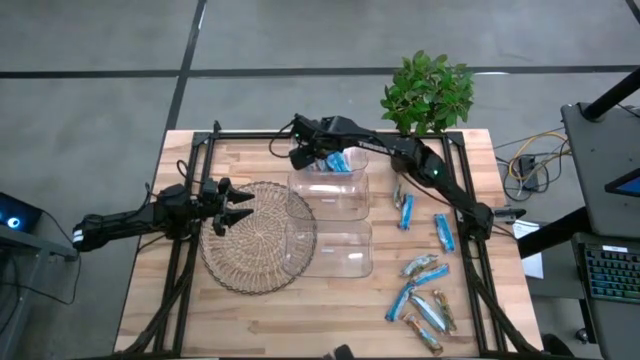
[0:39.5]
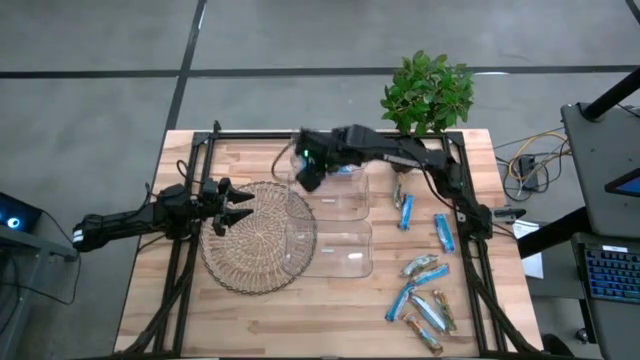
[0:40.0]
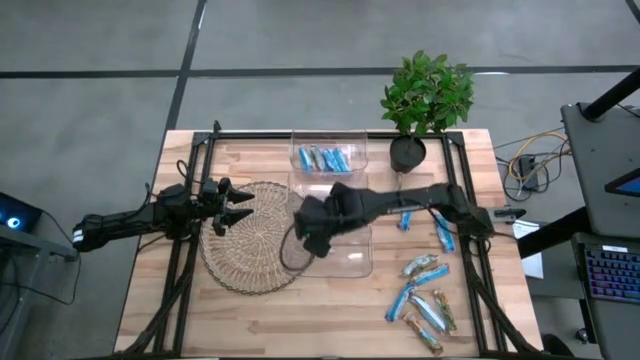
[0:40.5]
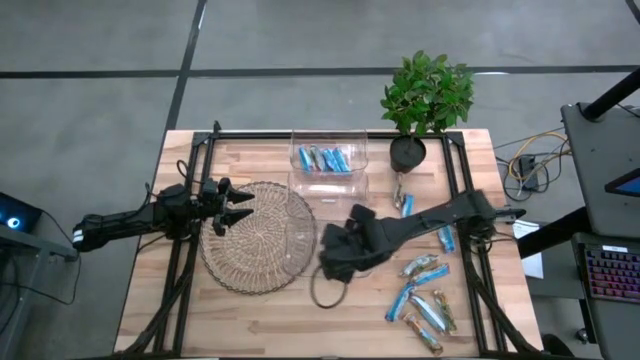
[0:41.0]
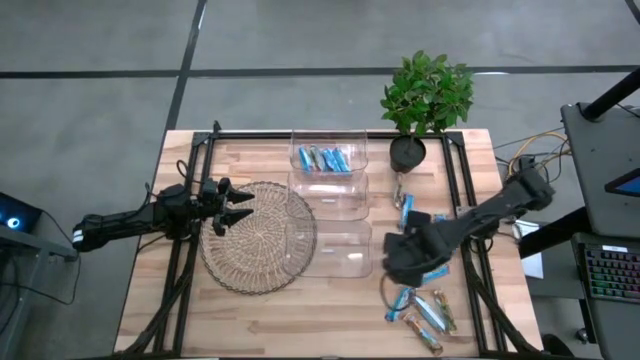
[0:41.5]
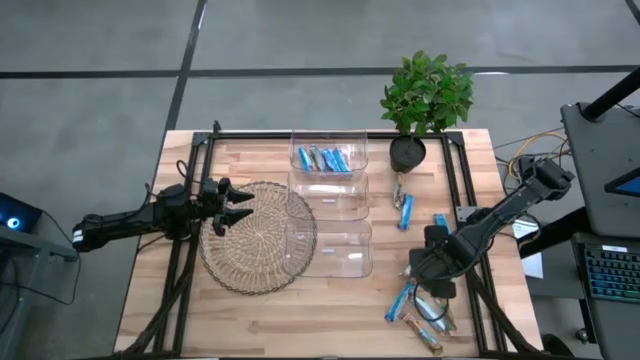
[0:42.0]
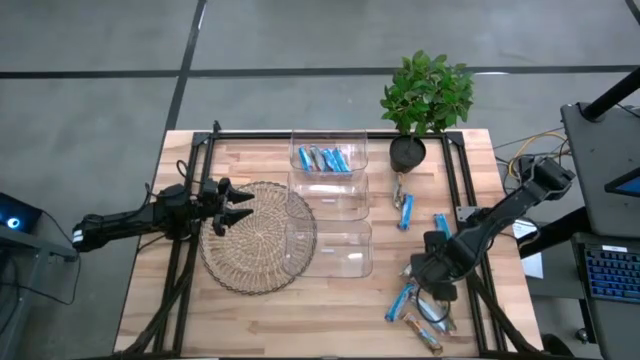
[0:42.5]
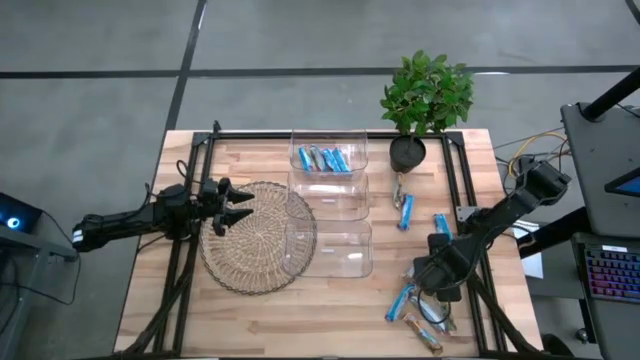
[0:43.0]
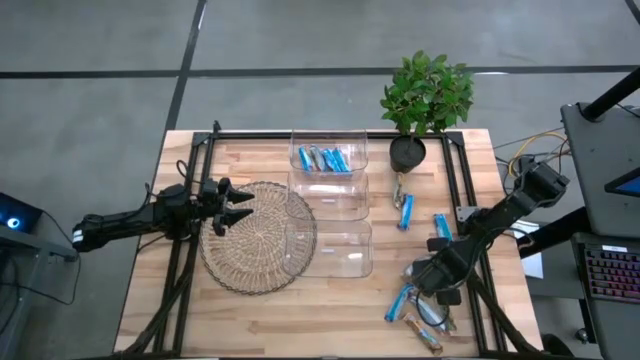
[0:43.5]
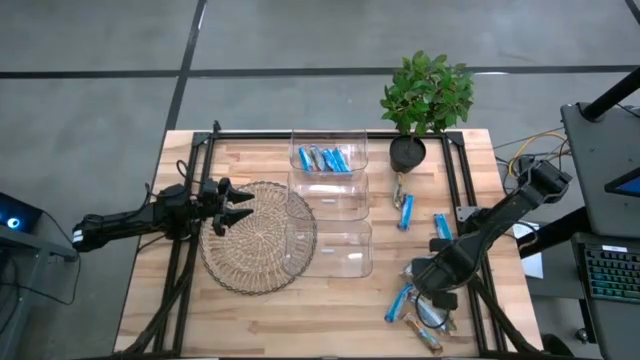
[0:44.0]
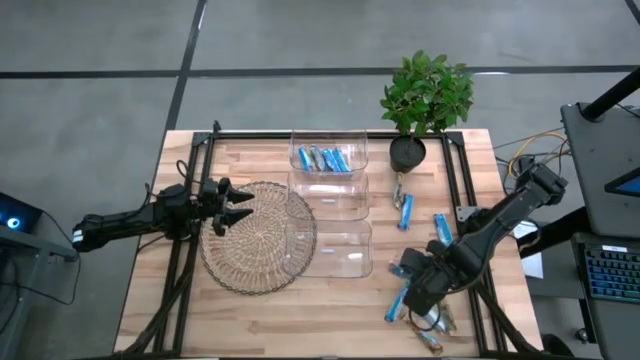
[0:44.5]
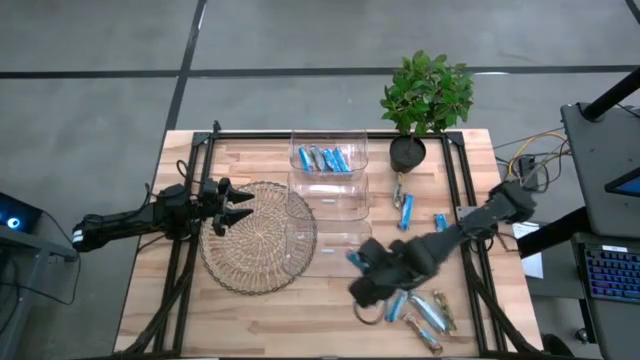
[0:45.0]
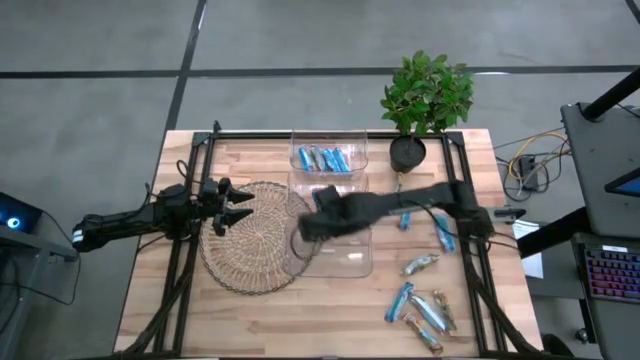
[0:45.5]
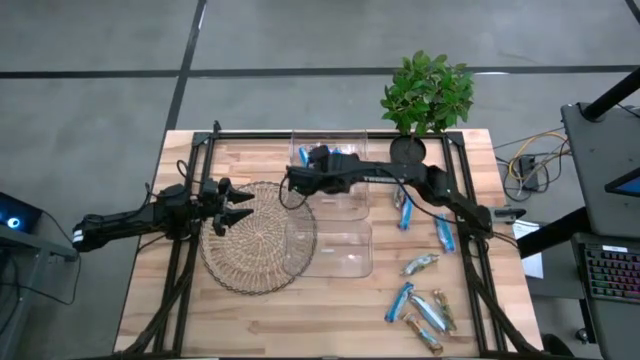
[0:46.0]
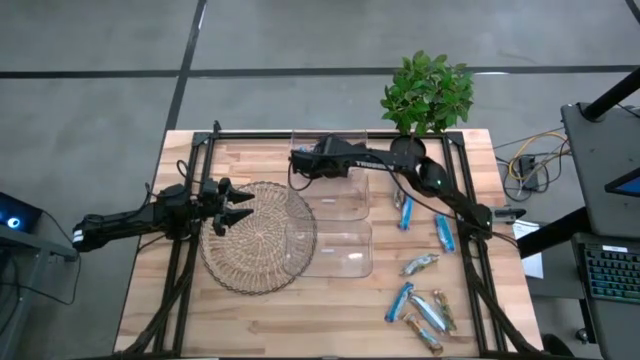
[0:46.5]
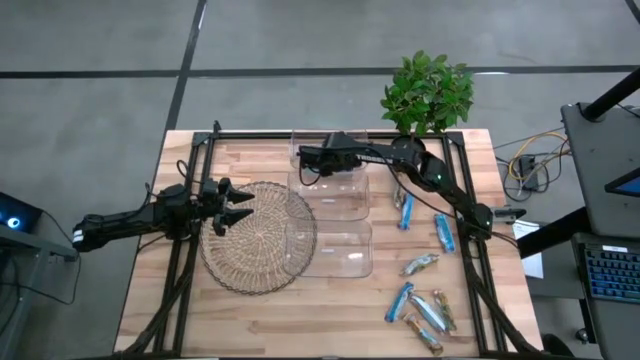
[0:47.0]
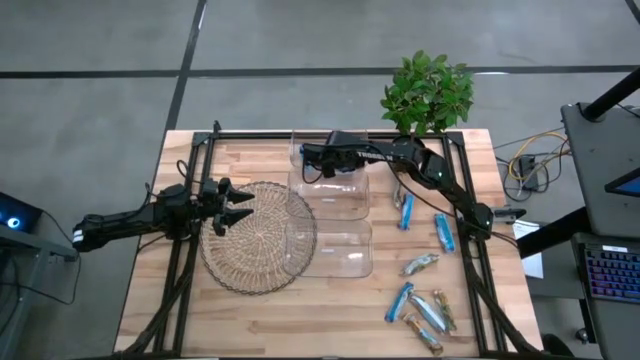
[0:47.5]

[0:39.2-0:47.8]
Task: Pick and place Granola Bars by type
Put the red granola bar into the top transparent bin

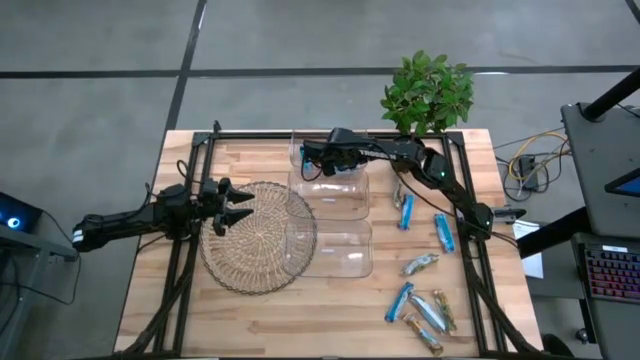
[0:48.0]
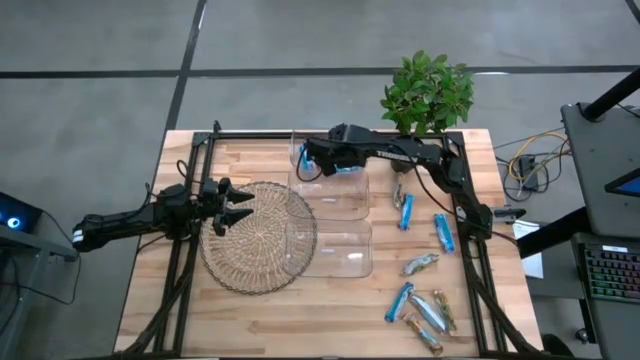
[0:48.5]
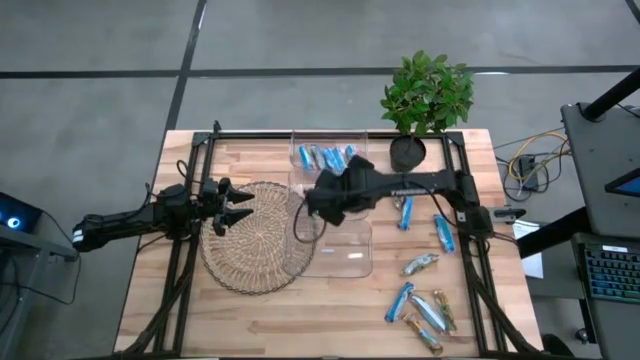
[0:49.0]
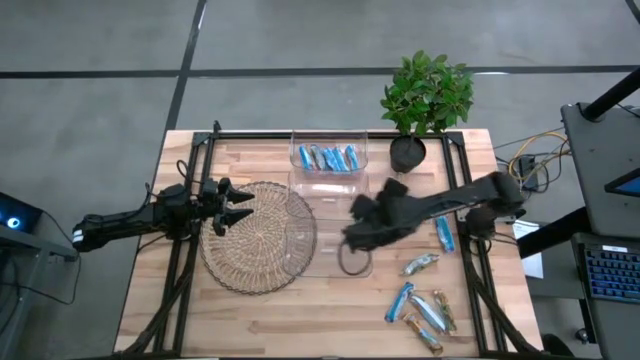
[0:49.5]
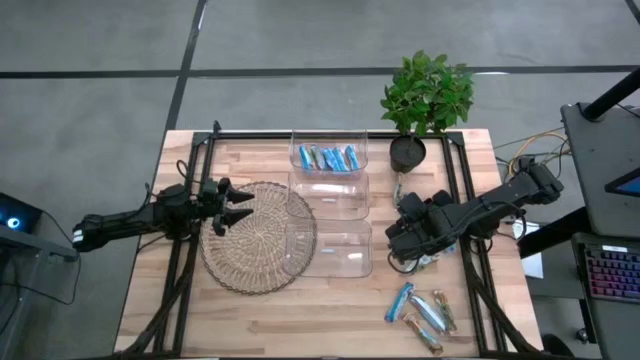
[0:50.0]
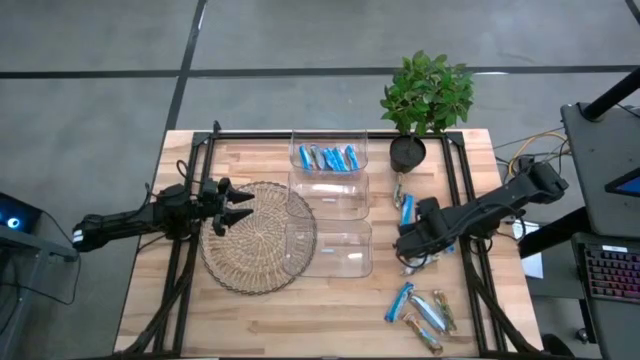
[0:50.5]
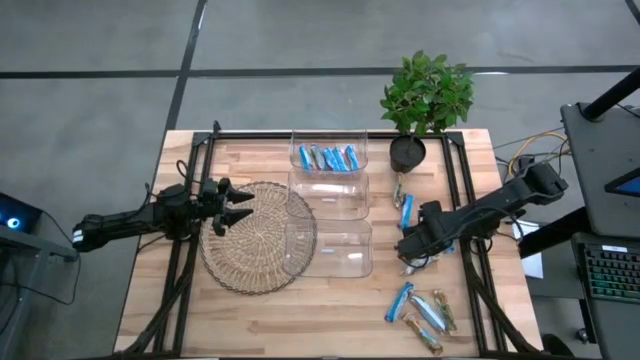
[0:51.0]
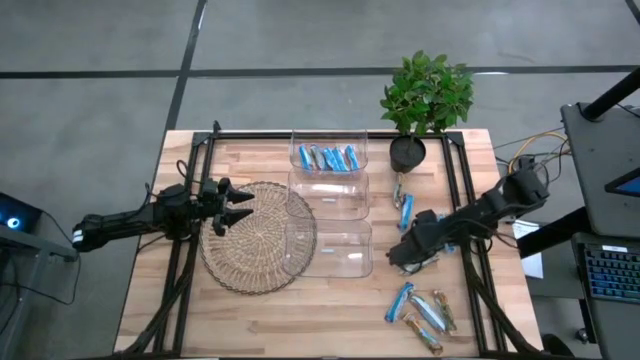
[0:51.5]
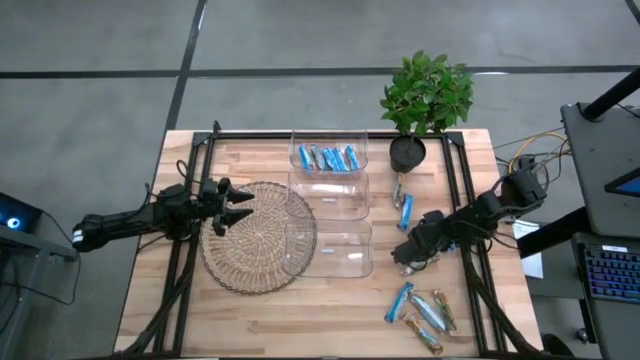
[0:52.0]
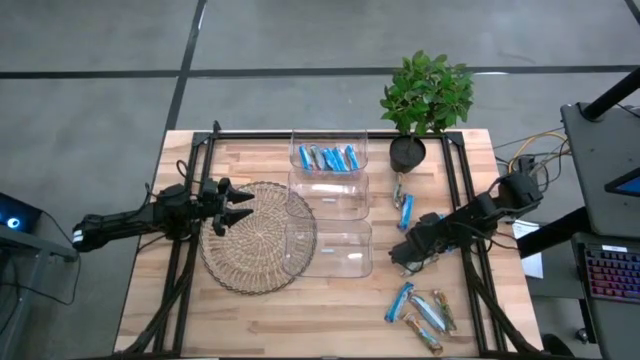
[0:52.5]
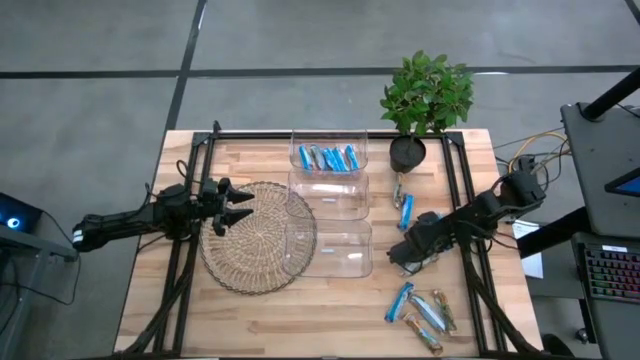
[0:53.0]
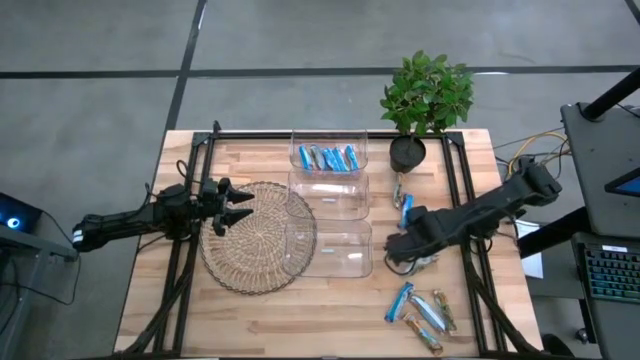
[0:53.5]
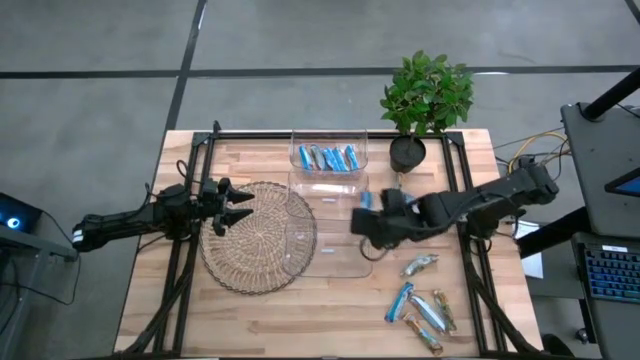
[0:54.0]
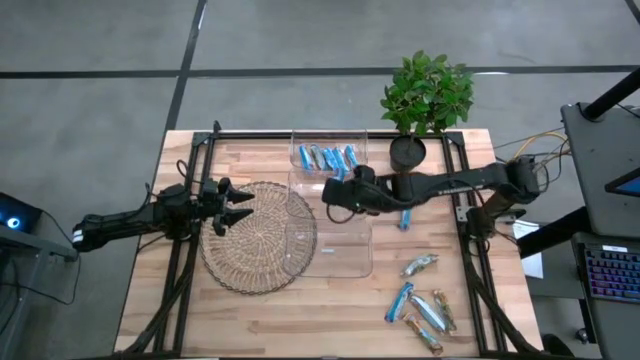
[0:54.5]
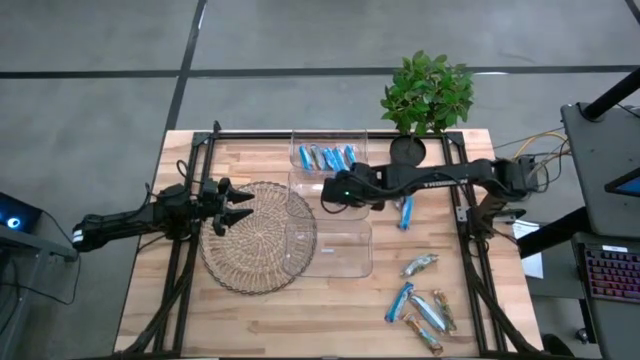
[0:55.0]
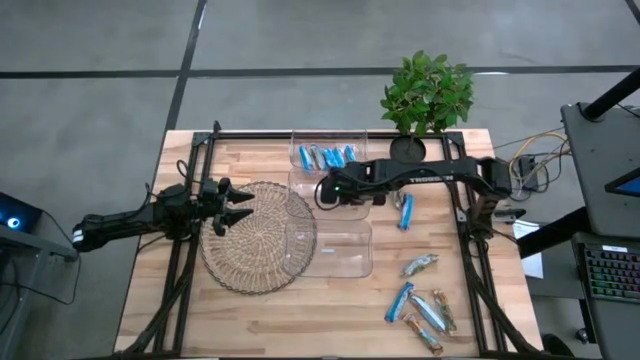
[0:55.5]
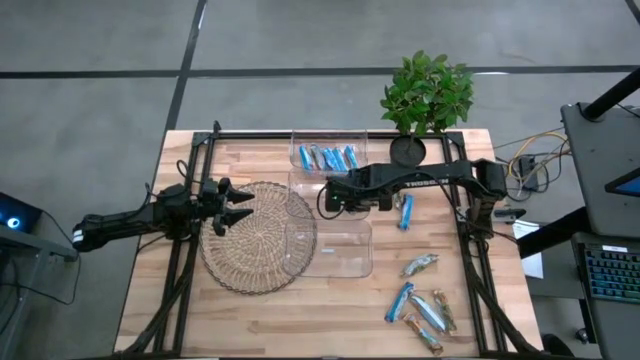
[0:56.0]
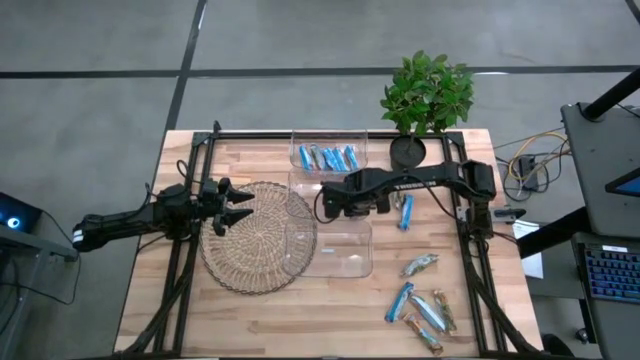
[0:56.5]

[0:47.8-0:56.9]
Put the blue granola bar into the middle transparent bin

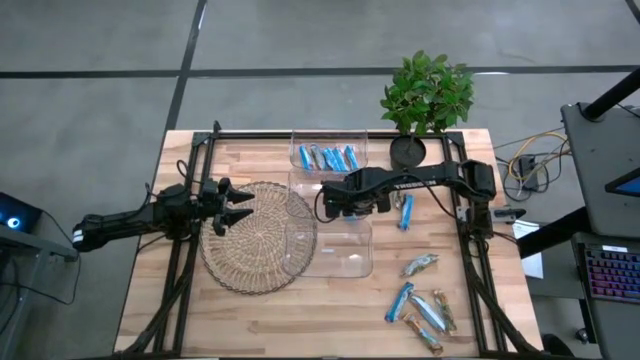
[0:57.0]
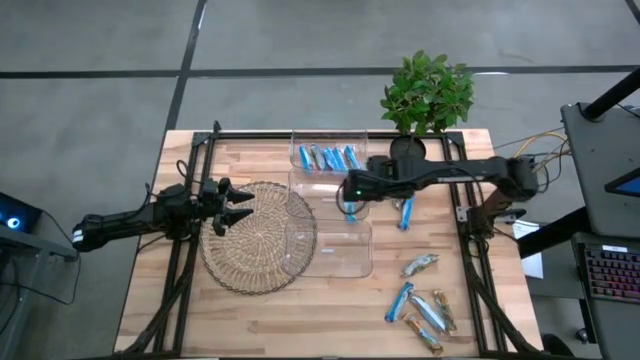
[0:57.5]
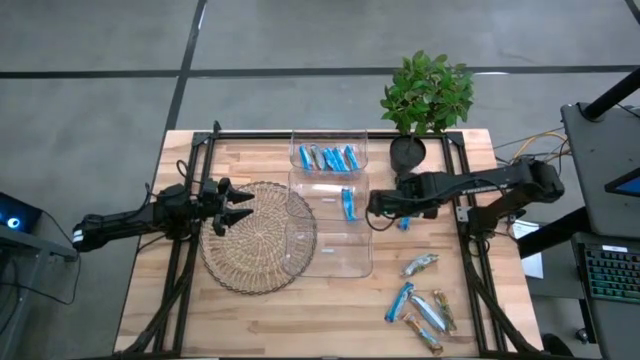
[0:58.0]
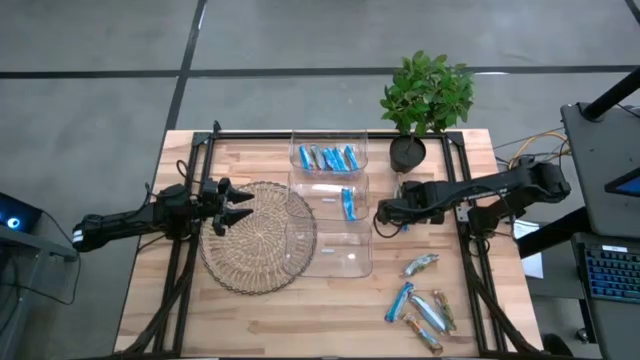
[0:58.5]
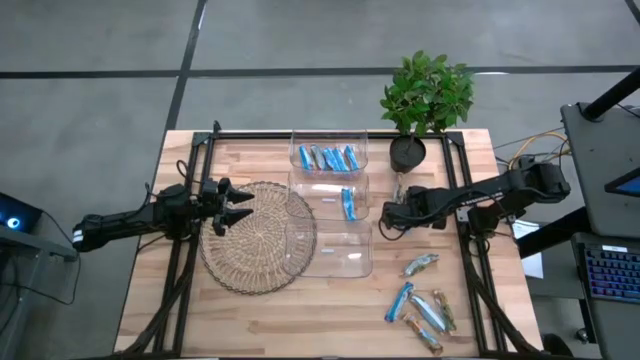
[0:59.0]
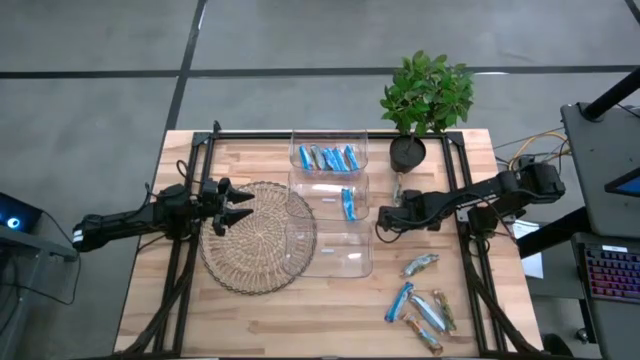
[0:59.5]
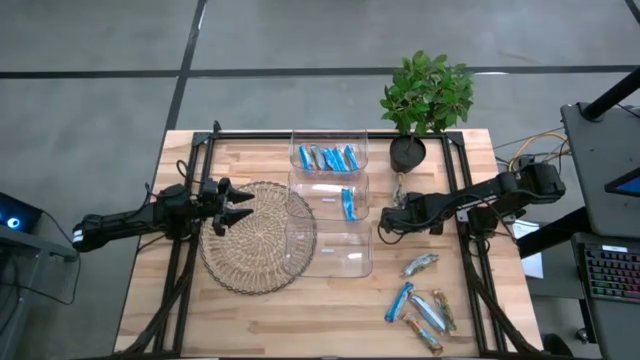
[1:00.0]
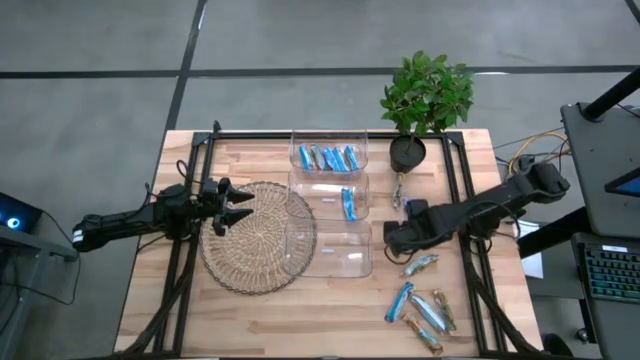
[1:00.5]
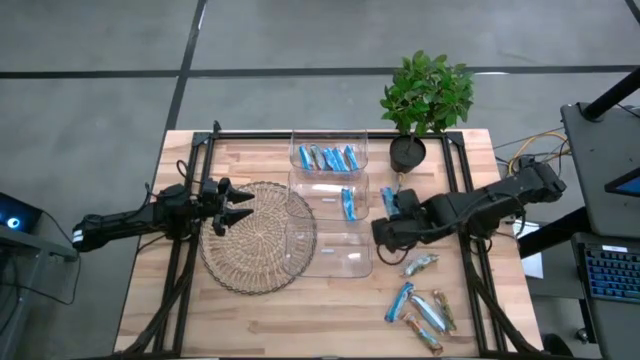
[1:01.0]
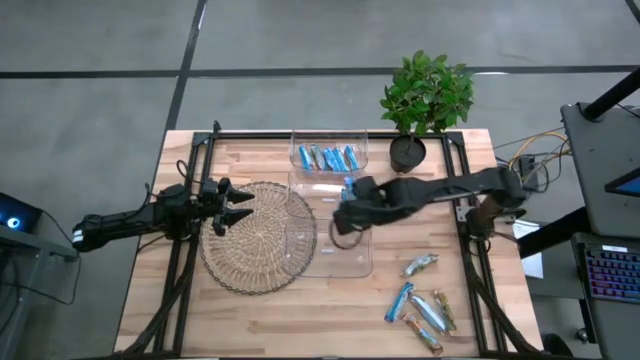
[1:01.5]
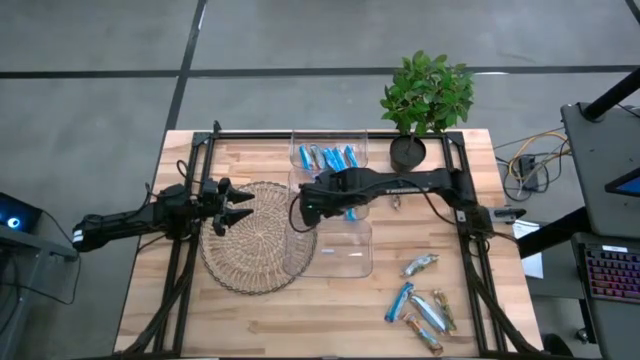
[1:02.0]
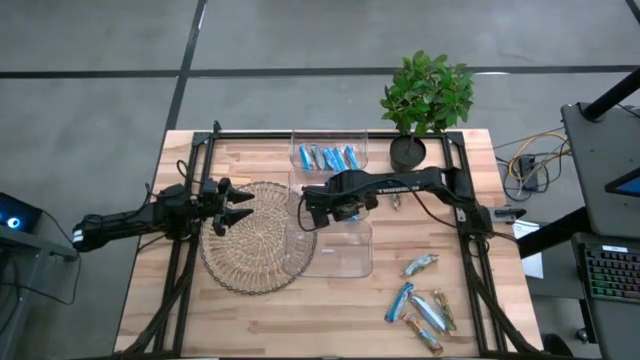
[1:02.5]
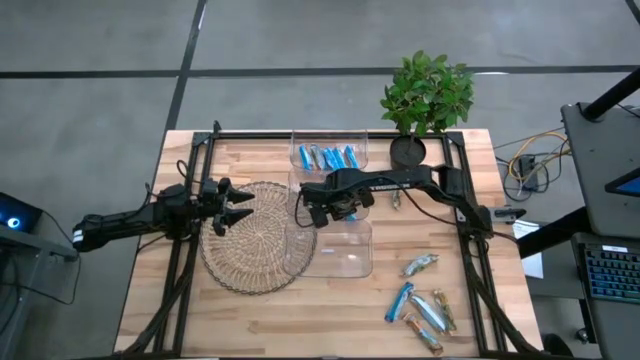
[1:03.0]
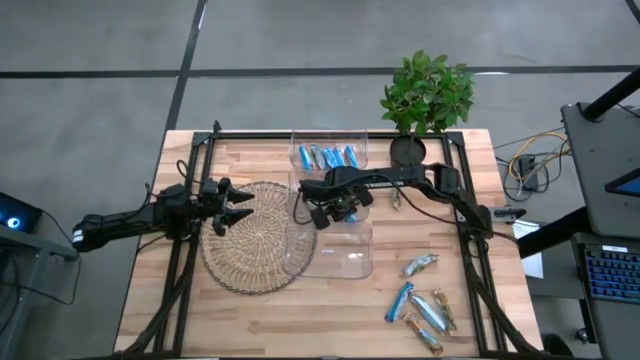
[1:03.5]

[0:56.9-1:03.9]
Put the blue granola bar into the middle transparent bin
